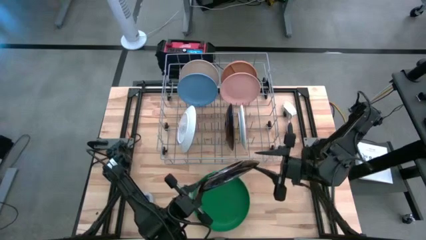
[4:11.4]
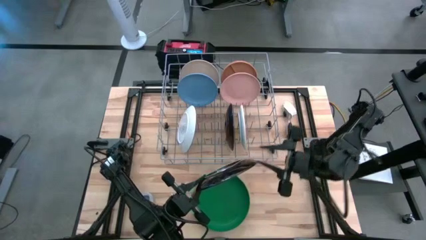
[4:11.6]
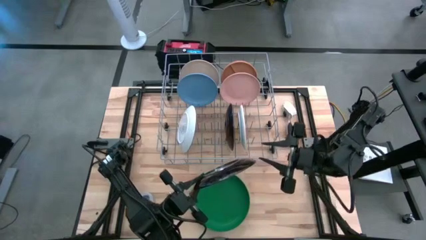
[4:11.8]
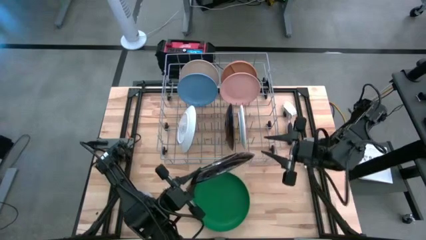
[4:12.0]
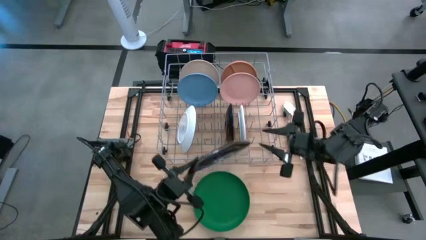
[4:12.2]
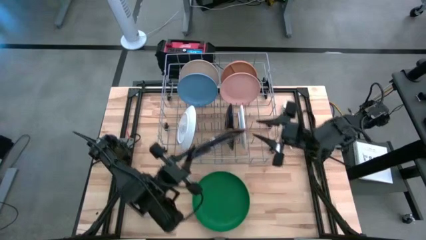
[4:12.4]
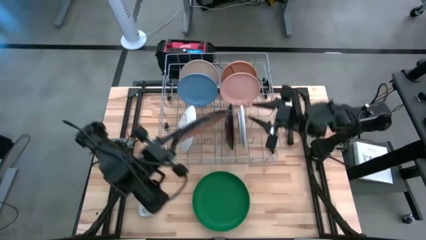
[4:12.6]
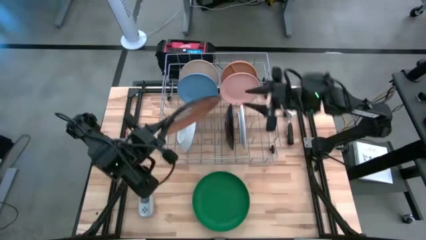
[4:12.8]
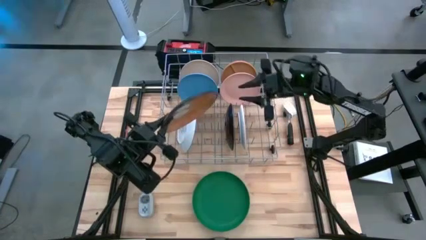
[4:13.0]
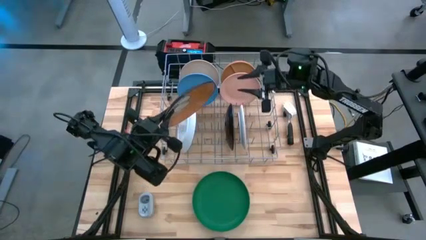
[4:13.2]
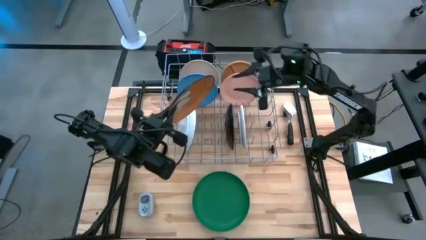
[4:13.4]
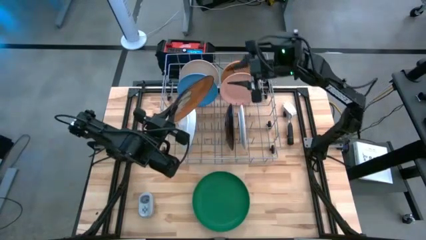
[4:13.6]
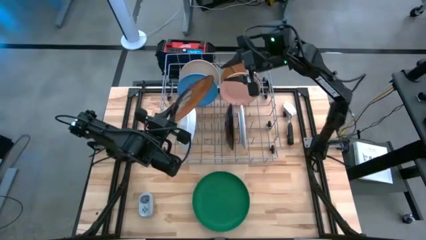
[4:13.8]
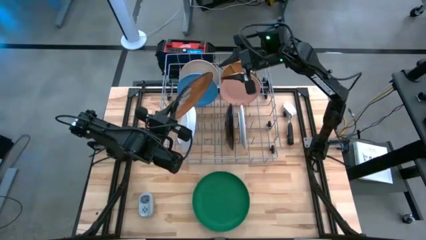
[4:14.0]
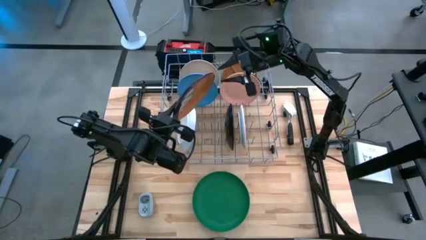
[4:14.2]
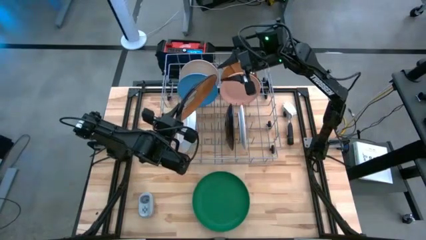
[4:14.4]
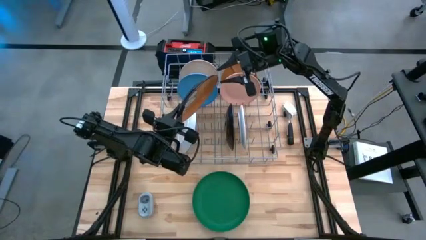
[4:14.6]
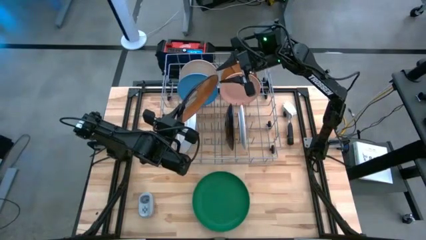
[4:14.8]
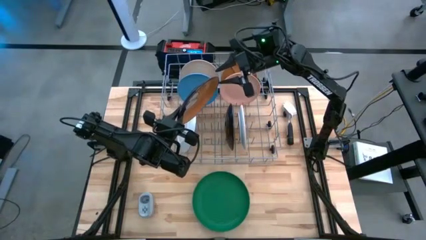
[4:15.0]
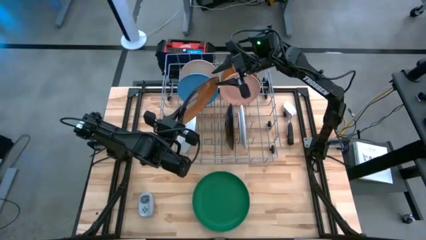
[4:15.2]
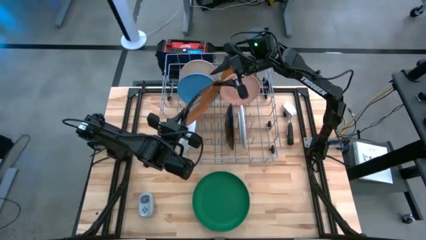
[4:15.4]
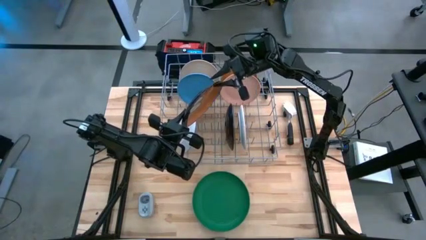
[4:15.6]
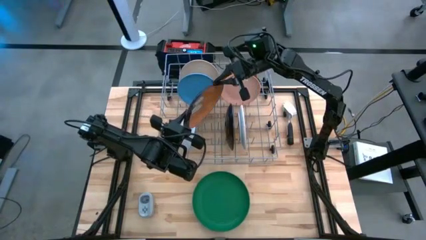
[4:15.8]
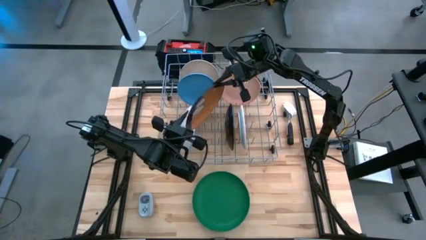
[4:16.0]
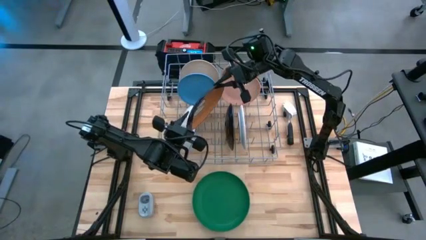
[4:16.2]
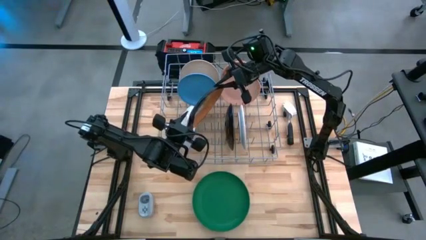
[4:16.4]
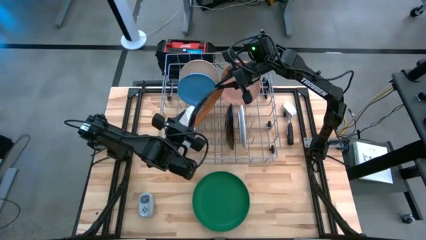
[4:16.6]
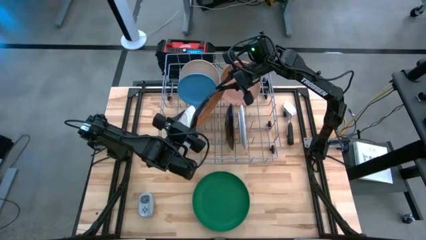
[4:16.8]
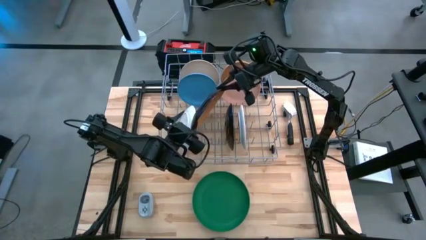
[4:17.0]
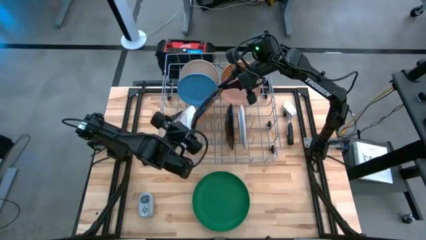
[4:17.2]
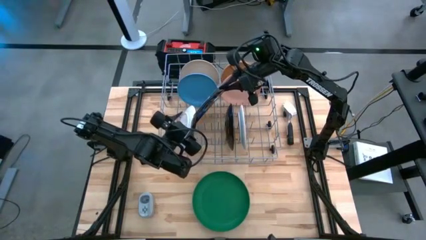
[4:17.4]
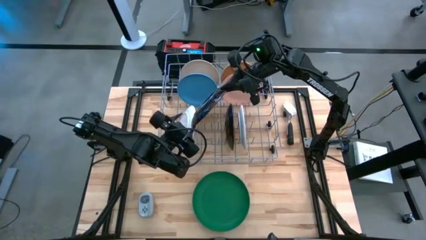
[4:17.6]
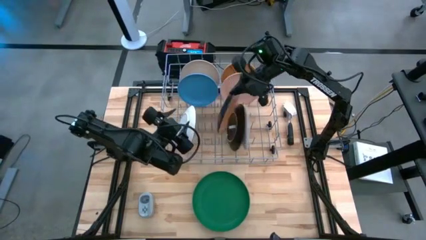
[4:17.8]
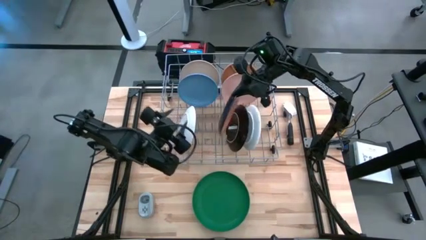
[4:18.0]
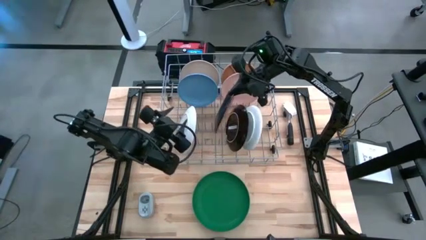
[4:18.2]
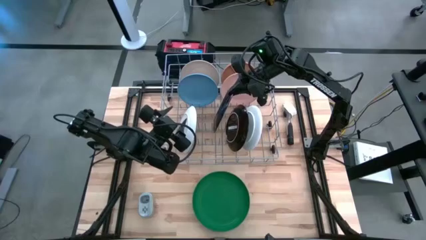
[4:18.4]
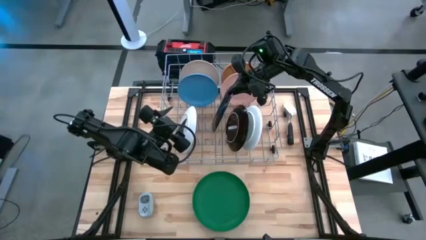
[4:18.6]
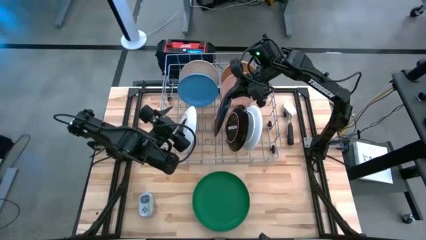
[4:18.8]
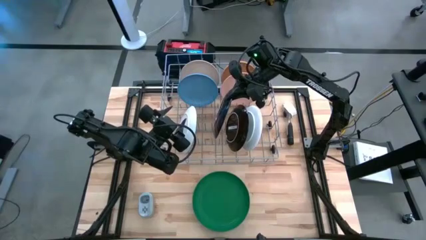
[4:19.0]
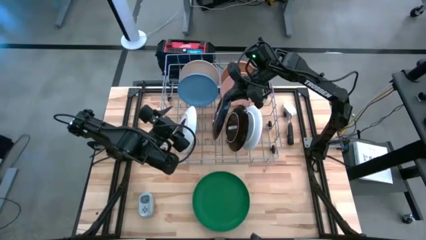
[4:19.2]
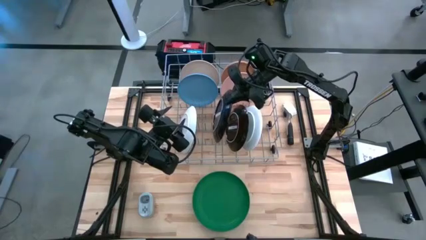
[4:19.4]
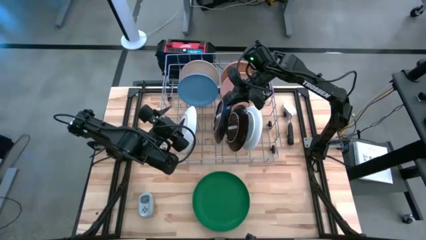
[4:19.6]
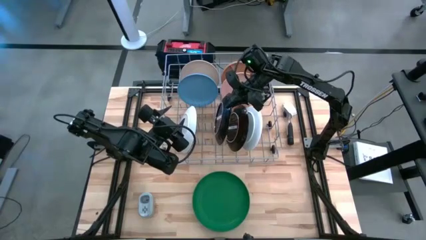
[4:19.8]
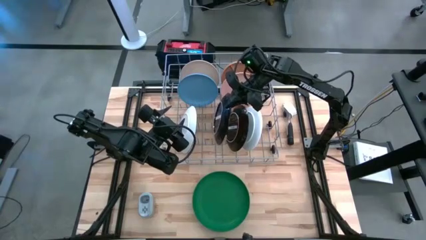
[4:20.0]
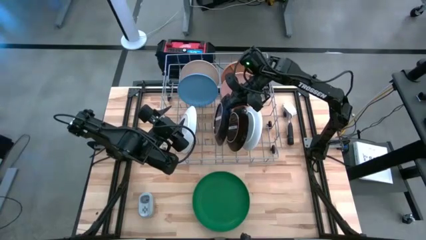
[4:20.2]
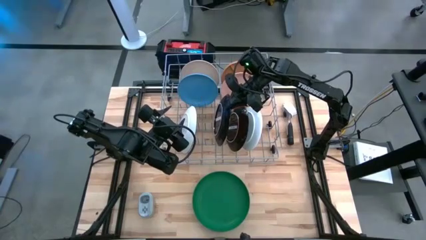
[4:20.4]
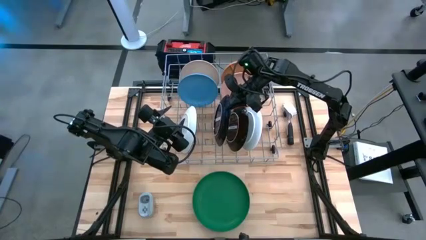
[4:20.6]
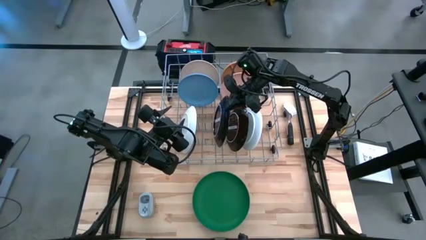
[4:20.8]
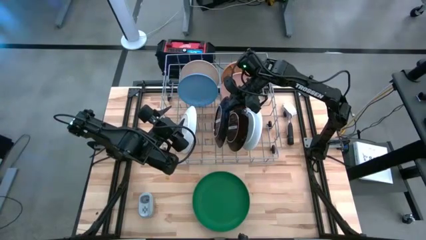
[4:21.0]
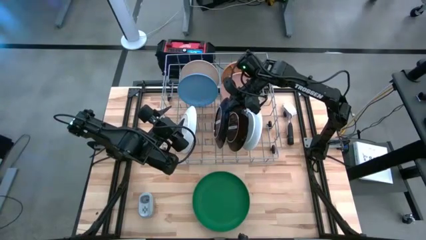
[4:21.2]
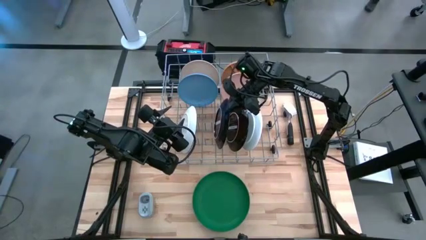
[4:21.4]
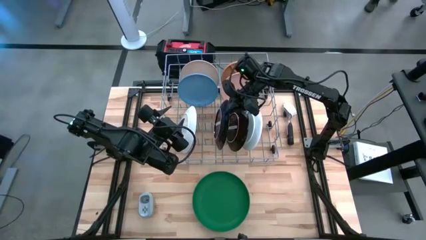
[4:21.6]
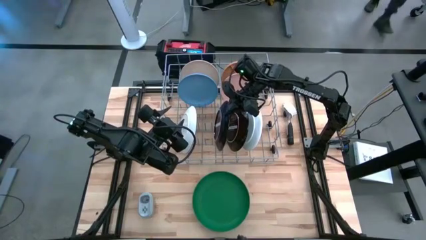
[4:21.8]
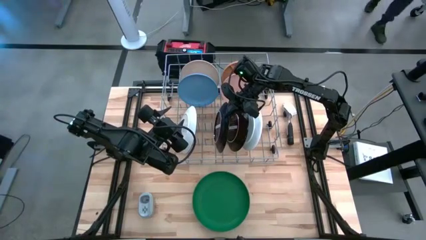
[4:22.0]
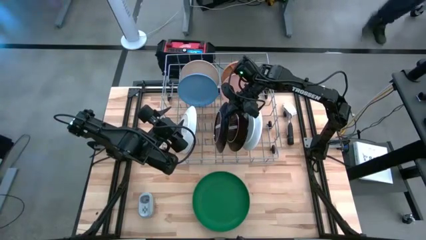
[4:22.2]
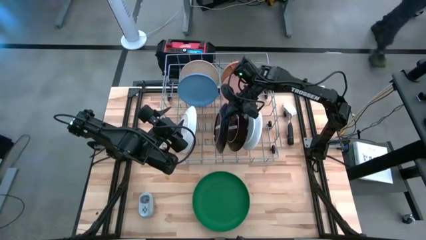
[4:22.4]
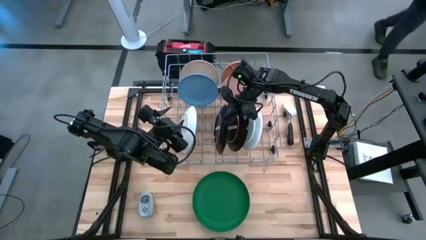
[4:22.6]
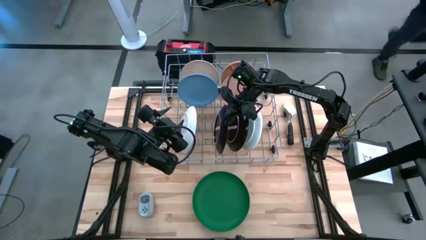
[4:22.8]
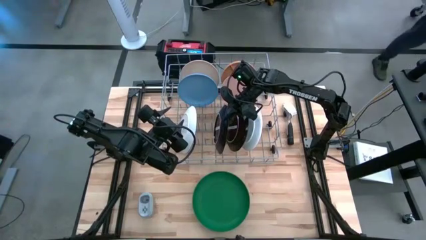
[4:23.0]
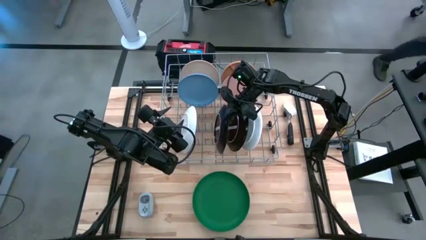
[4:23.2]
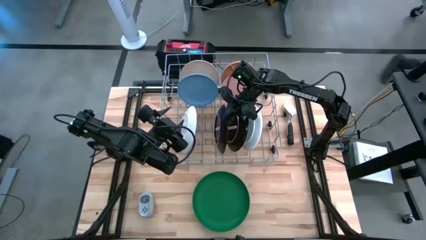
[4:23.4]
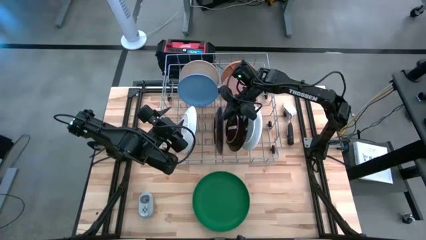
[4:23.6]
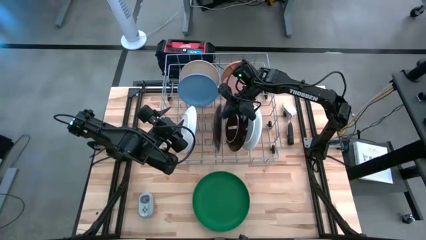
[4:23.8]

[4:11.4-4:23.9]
Task: Sort dishes
Put the orange flower patterned plate into the dish rack

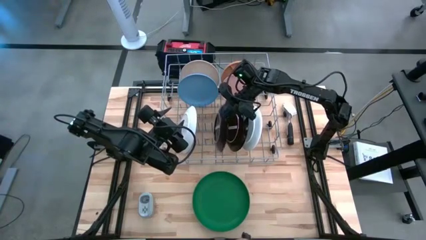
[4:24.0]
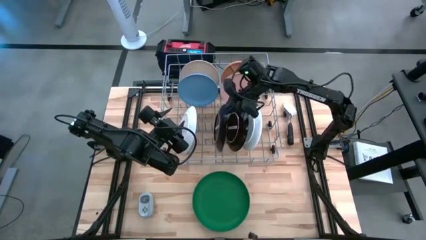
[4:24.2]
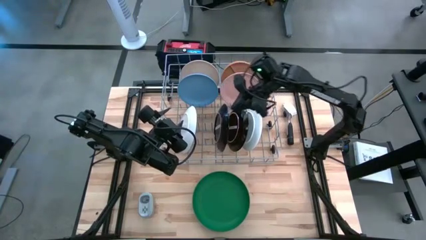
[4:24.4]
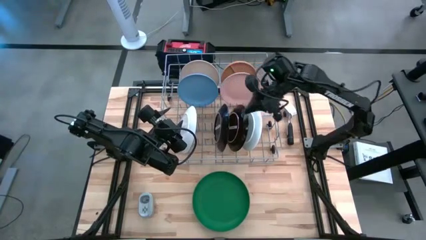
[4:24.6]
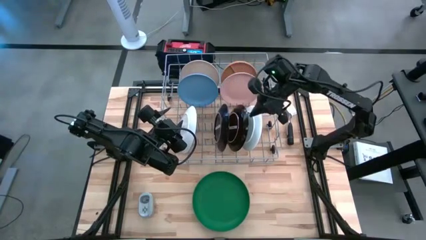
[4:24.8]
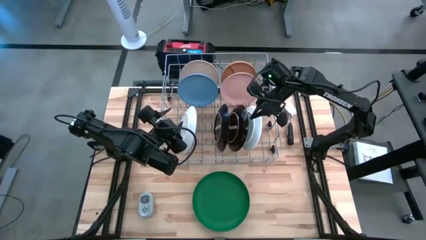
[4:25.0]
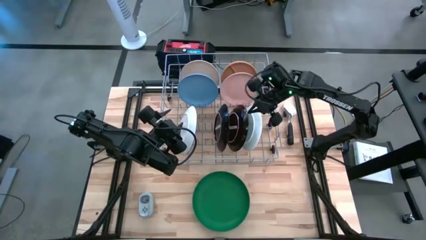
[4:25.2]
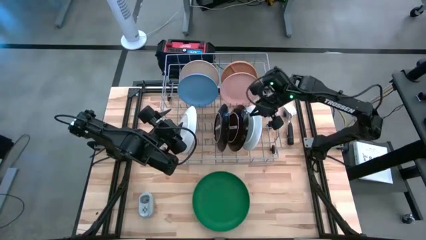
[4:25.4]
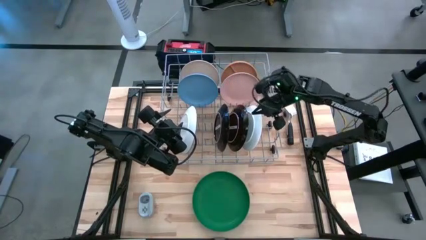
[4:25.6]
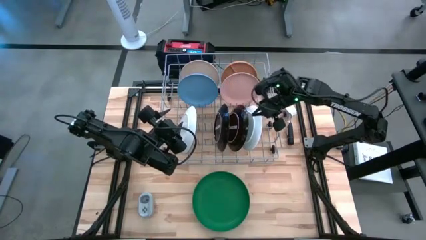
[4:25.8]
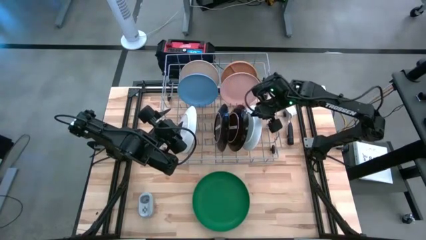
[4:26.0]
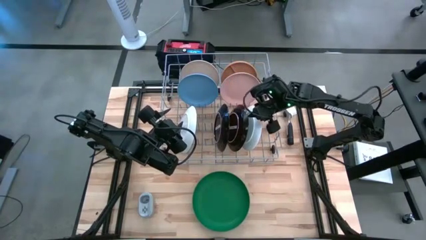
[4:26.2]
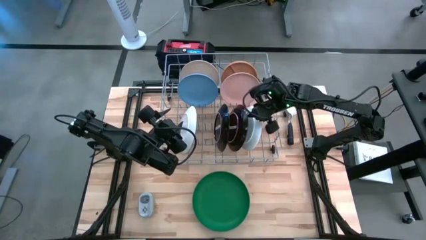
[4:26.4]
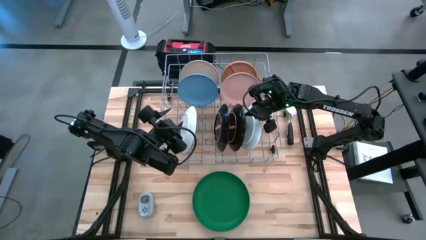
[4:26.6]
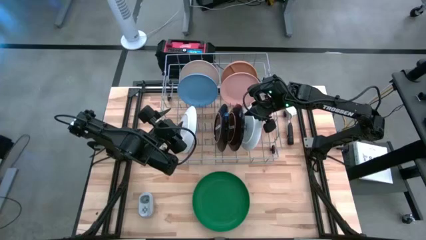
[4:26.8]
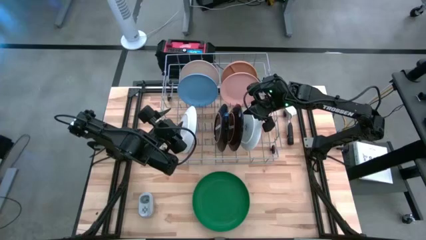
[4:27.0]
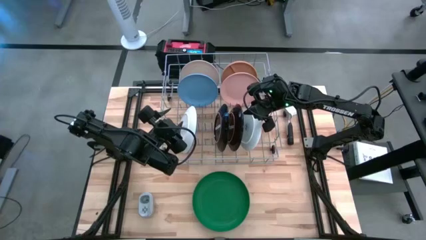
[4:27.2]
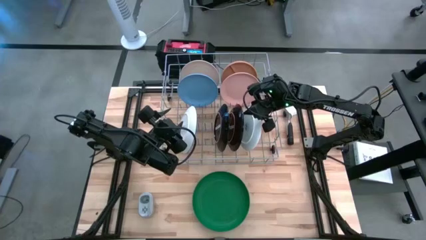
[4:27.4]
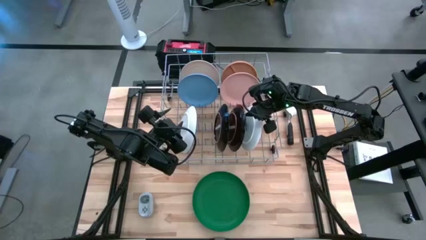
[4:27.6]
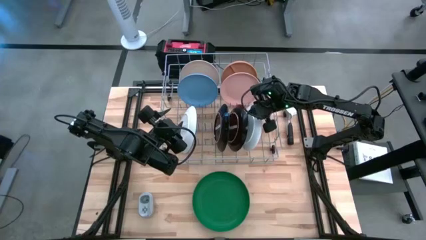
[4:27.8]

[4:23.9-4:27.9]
Adjust the blue flower patterned plate on the dish rack
